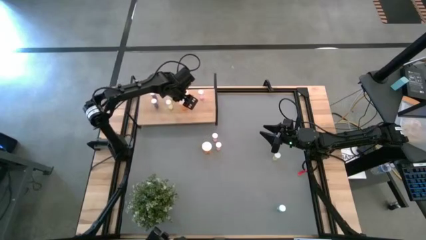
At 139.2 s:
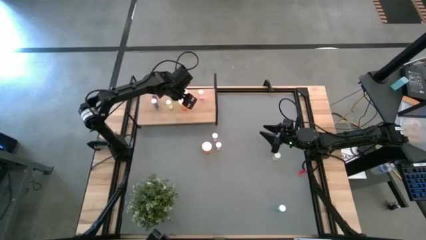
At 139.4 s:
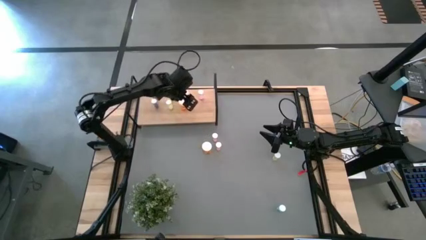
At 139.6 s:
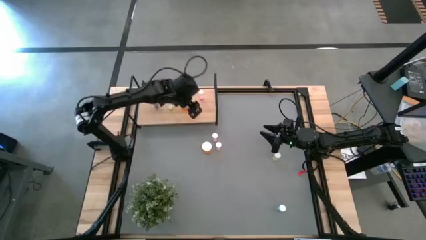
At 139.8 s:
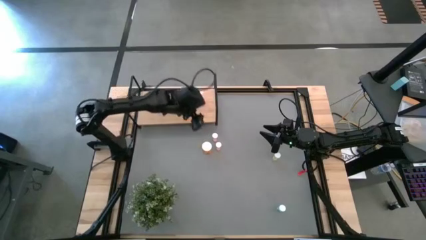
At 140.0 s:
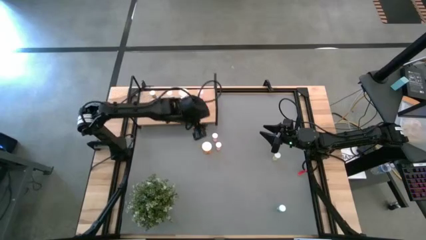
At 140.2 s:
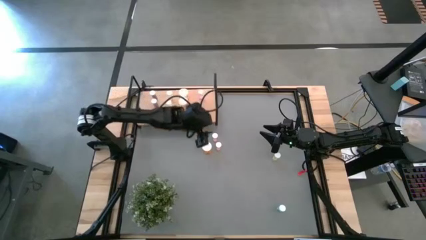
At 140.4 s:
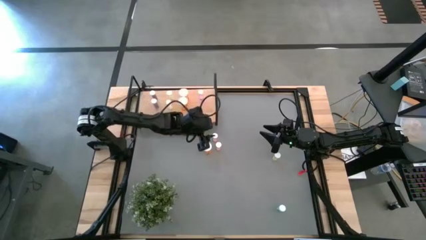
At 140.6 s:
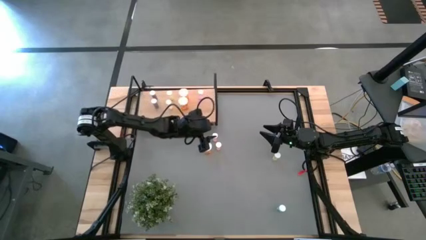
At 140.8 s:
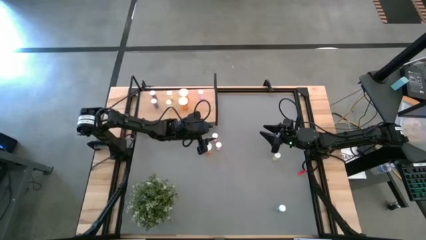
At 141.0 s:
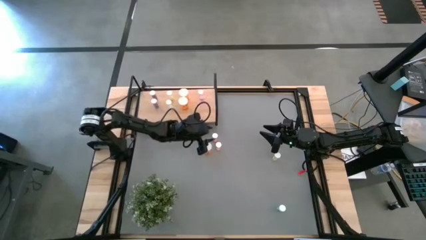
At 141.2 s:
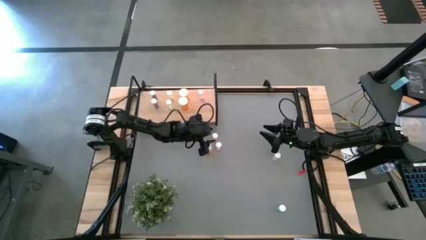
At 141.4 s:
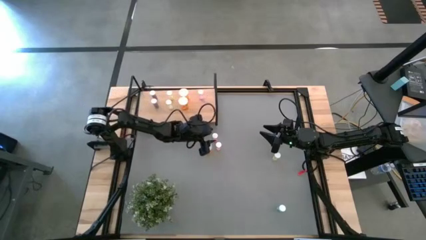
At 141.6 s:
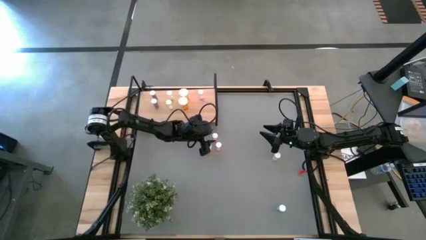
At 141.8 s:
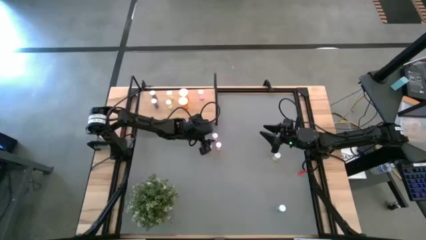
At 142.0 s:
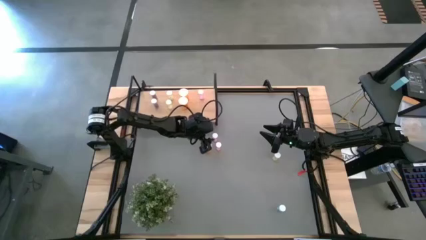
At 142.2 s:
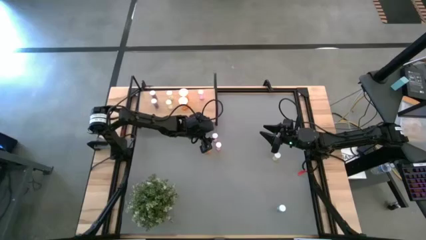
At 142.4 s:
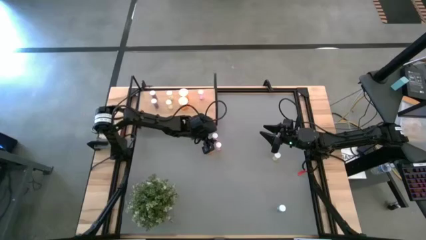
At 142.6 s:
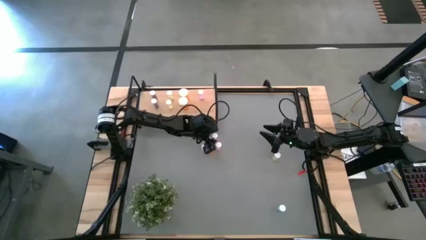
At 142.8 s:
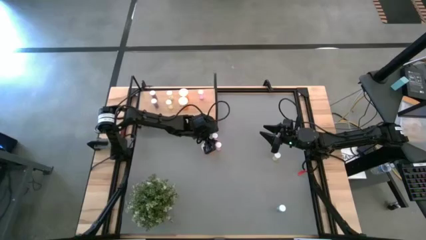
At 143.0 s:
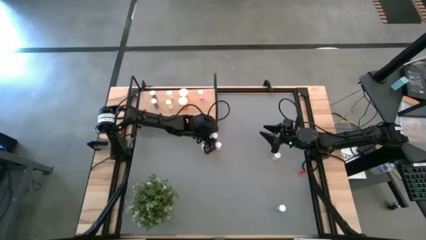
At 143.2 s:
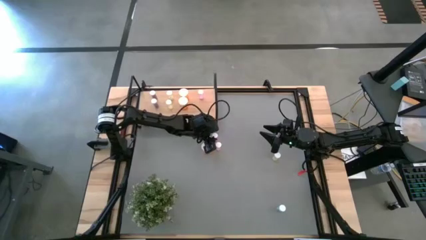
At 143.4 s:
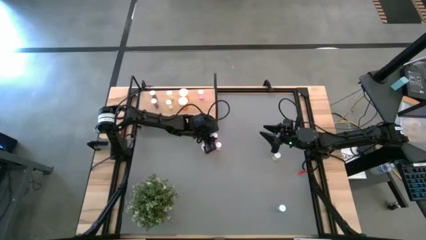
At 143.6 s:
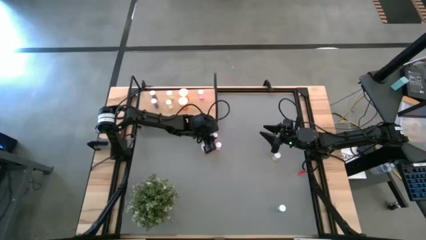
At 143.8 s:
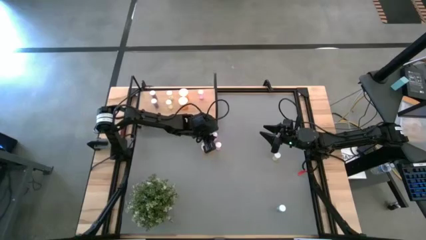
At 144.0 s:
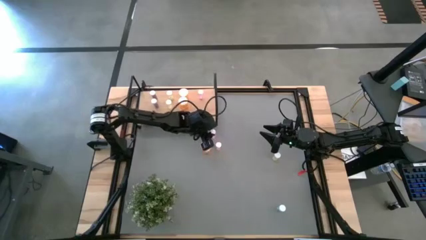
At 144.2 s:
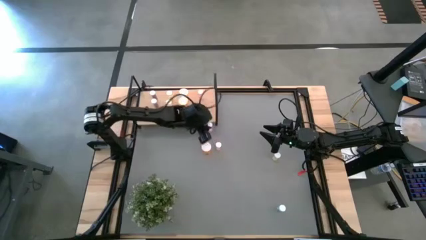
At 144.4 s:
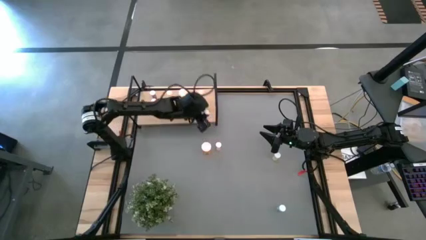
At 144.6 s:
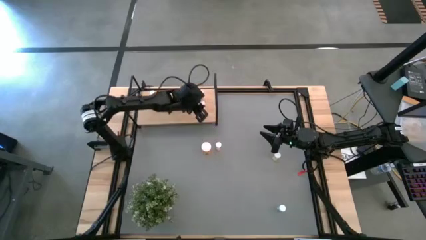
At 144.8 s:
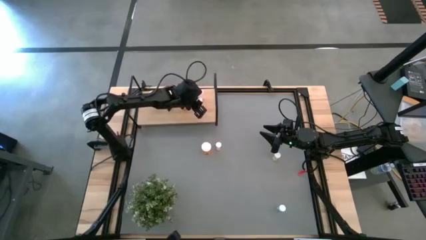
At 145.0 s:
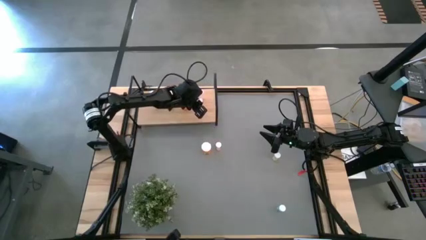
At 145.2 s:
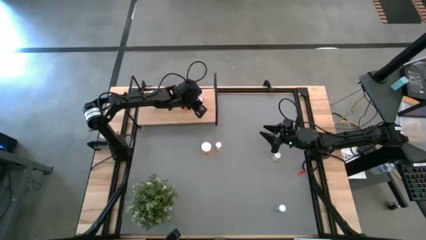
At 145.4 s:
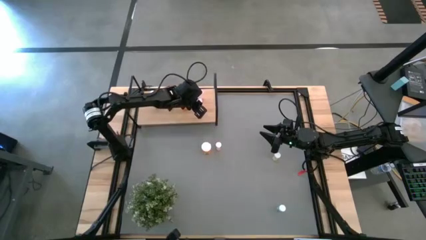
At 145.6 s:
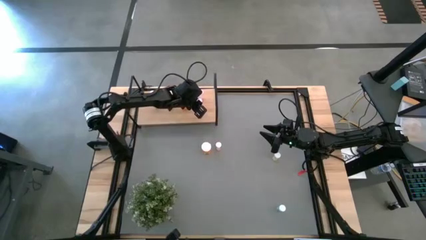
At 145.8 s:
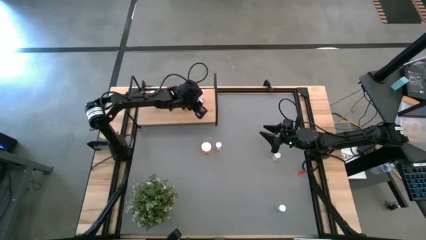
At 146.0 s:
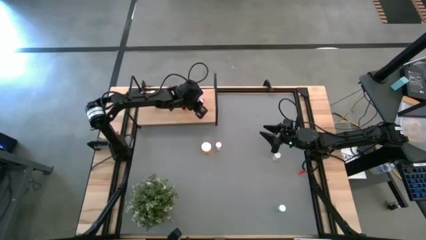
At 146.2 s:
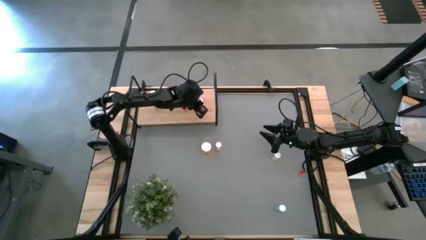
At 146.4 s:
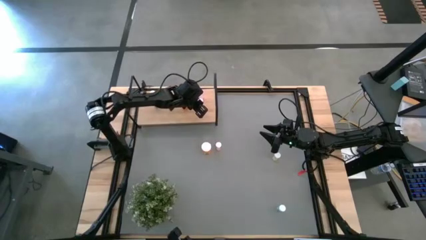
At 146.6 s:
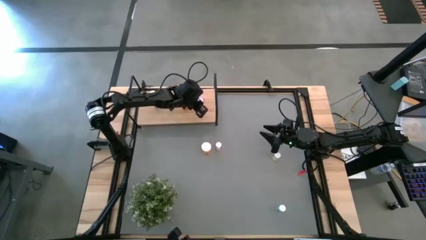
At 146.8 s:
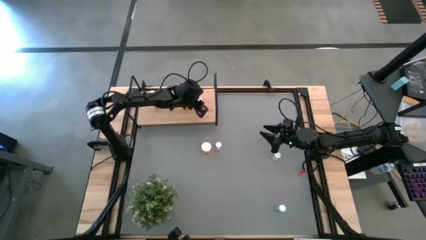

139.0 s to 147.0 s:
Task: Pick and place medicine bottles onto shelf by color
Put the top pink pill bottle on the shelf

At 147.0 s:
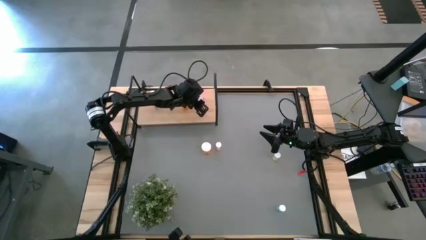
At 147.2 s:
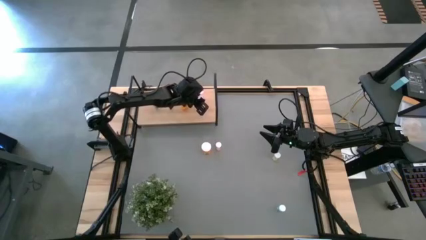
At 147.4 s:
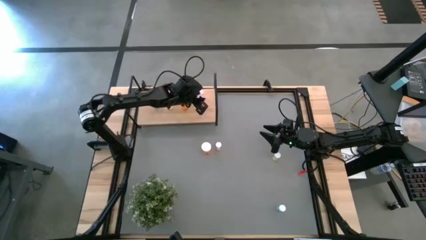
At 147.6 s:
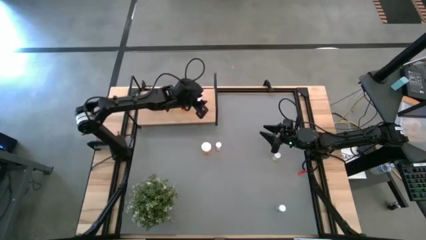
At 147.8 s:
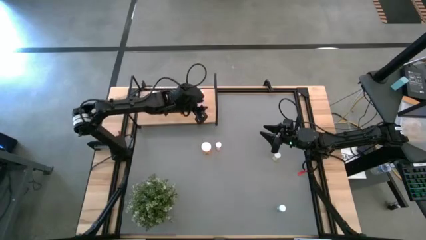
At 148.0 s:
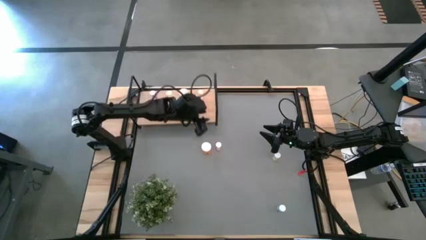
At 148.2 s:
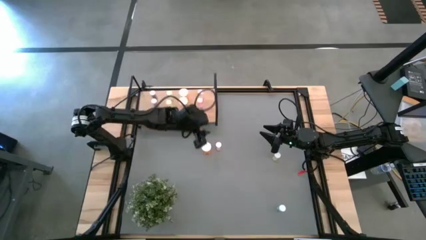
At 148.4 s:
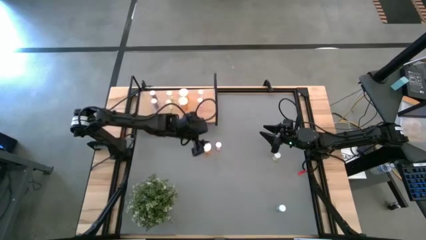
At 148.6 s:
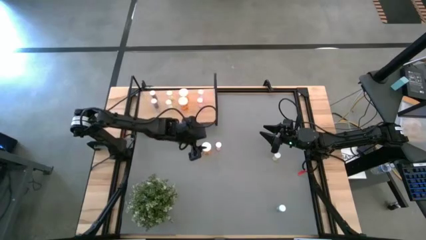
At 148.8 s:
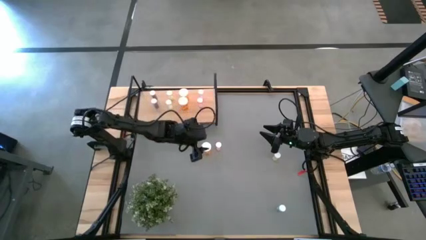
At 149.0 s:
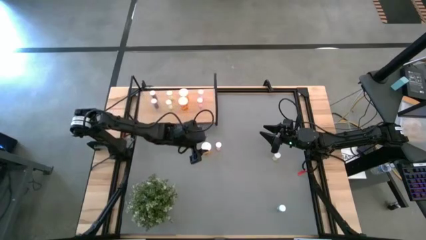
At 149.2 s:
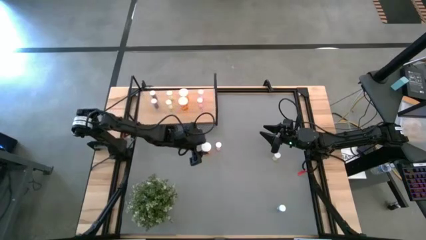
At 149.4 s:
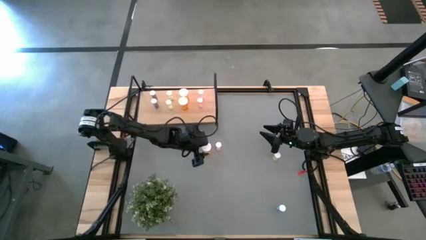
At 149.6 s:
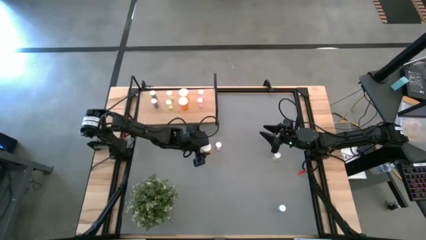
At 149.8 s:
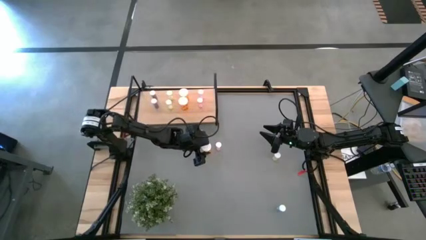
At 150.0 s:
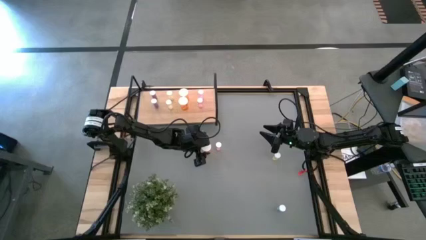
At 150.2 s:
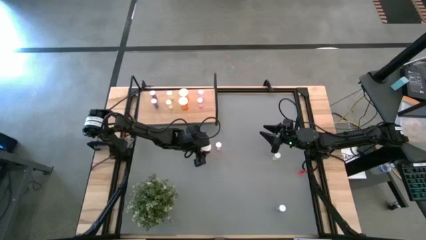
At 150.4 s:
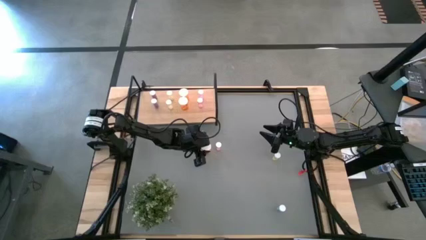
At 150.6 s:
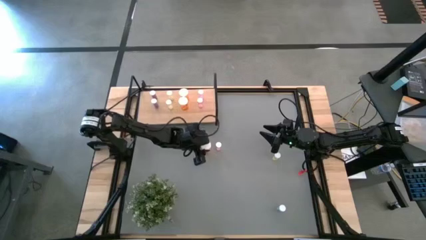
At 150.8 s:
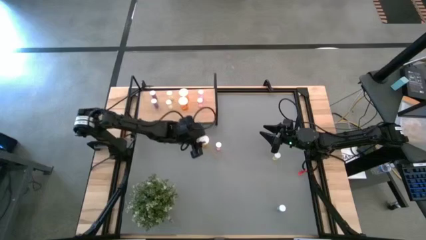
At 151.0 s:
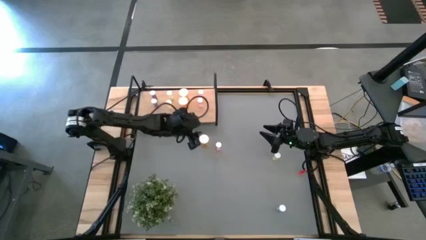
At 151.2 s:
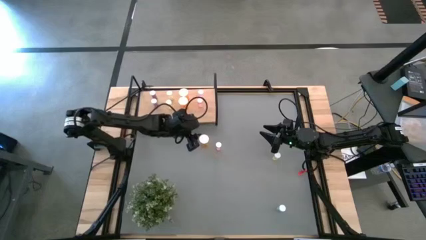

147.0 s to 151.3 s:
Put the orange pill bottle on the shelf

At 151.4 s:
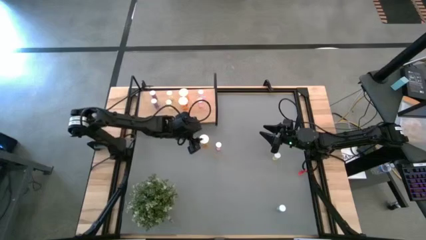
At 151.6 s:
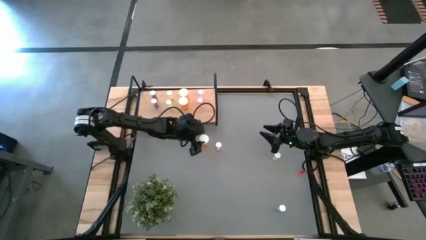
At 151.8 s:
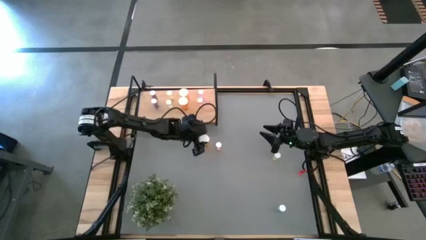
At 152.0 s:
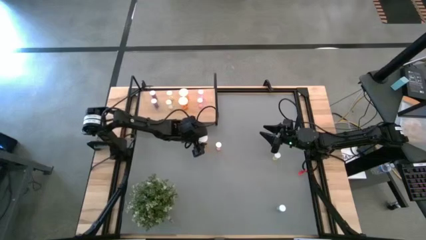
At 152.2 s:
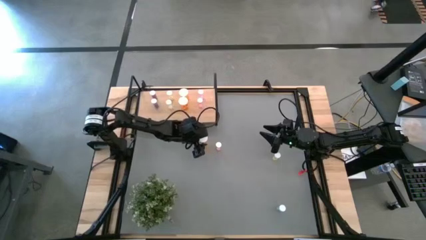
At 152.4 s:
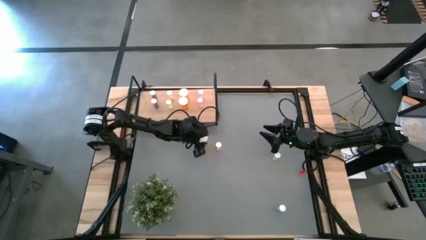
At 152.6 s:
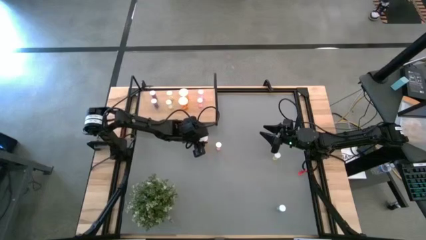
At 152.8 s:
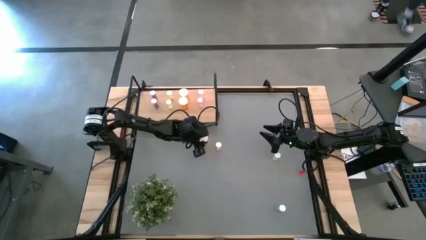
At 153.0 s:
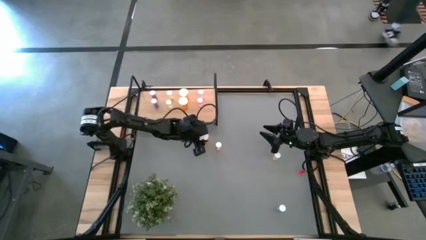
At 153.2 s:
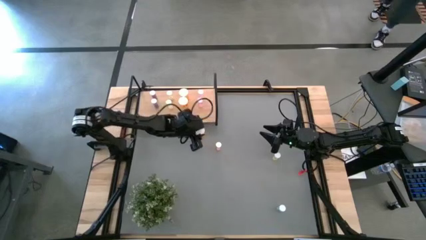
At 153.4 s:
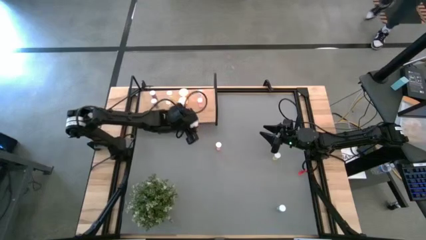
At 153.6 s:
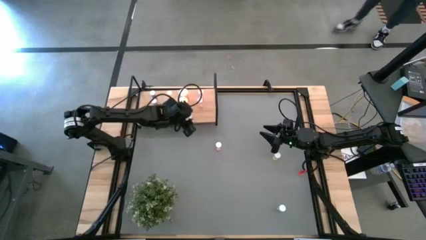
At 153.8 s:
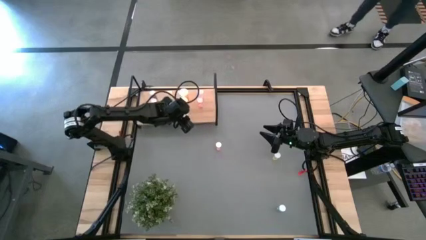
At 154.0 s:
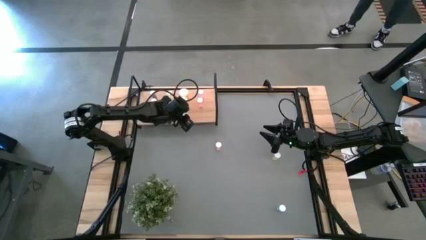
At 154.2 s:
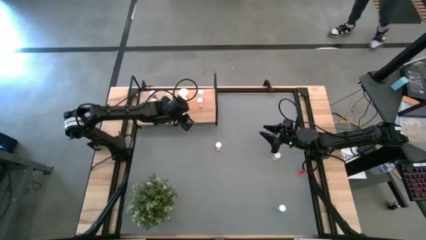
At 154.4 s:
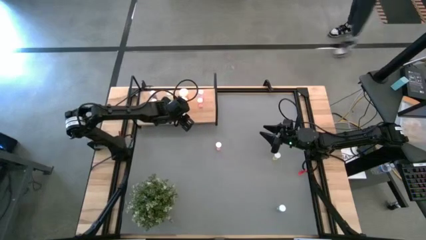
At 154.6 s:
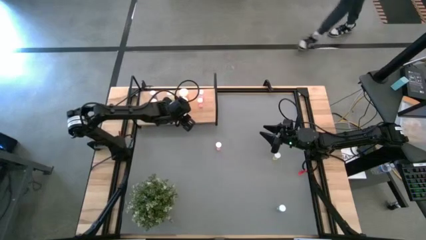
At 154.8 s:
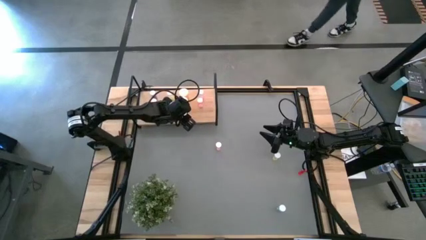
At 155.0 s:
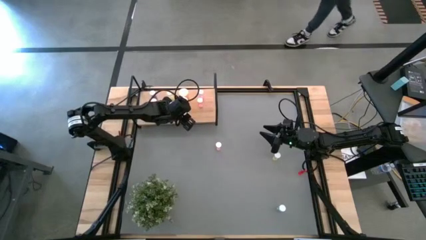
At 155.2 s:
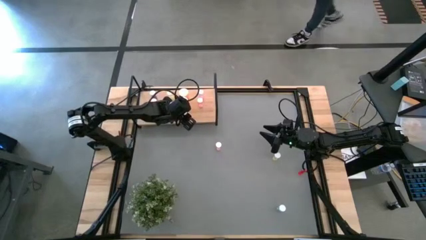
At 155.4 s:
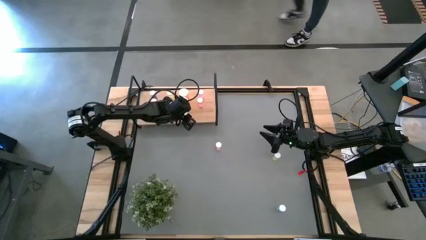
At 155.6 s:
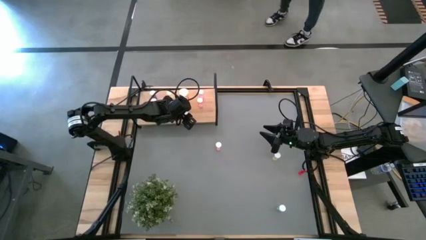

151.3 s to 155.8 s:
Put the orange pill bottle on the shelf
